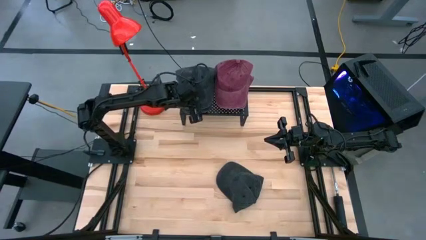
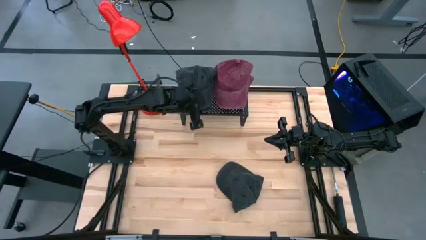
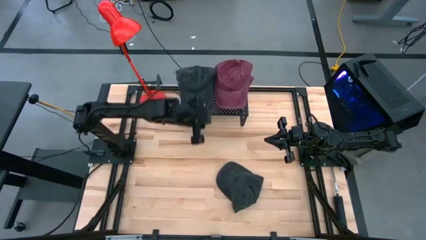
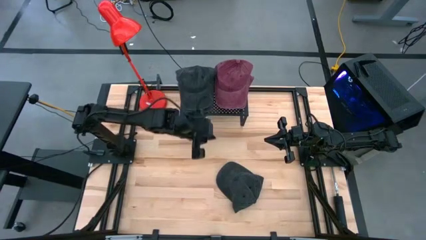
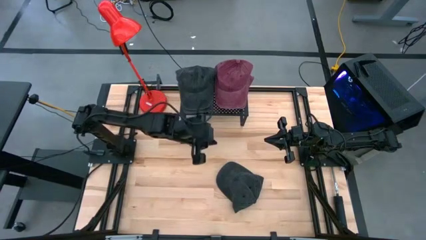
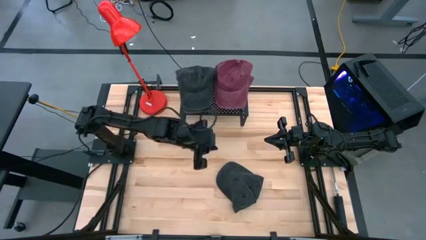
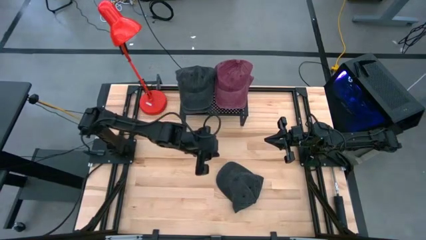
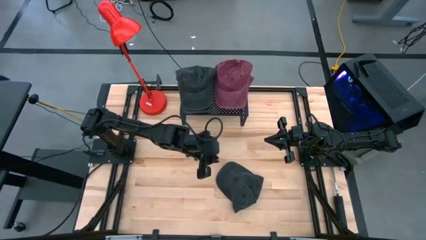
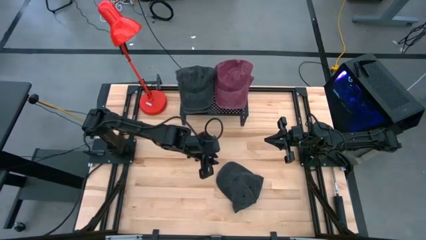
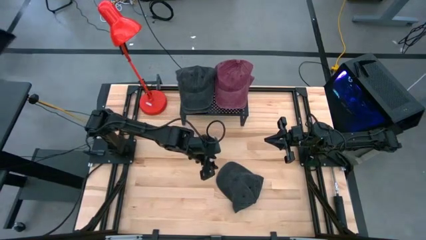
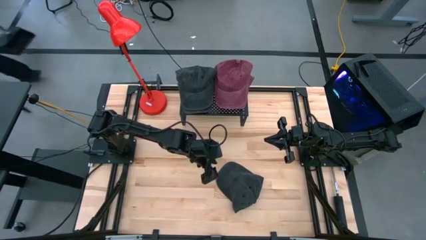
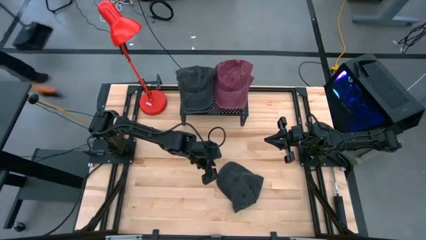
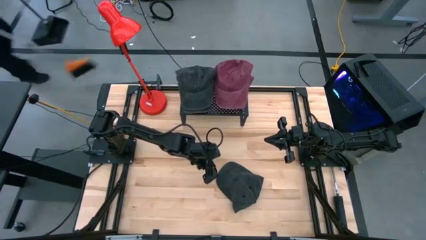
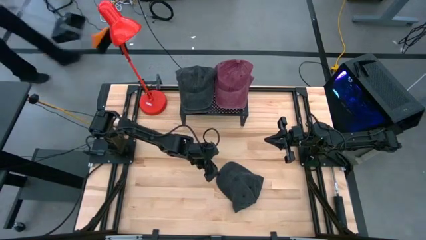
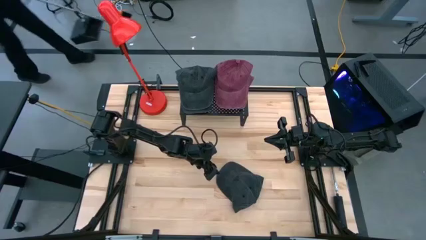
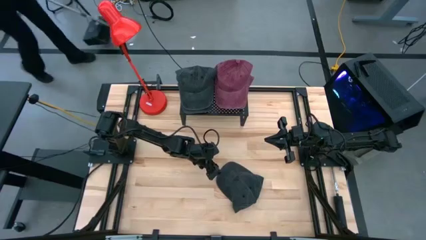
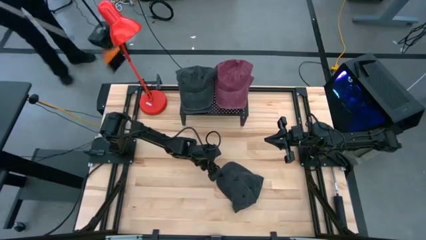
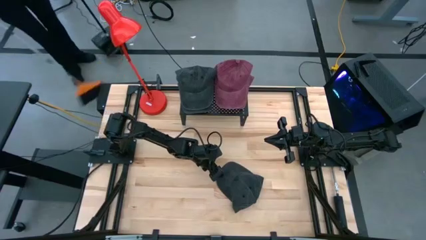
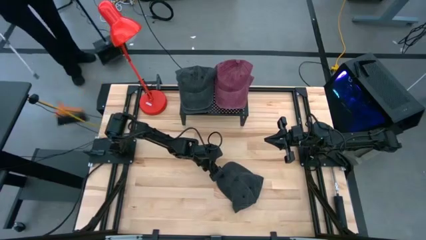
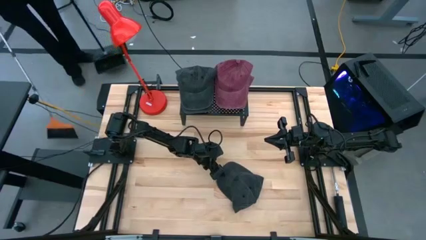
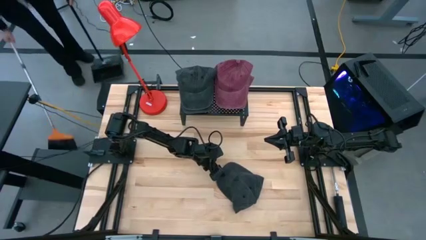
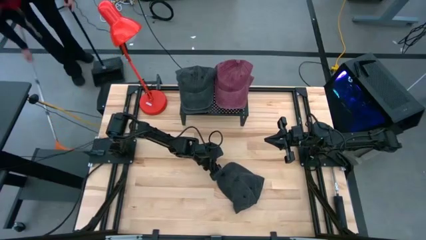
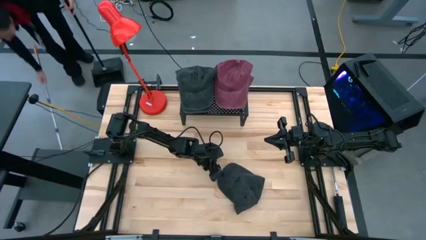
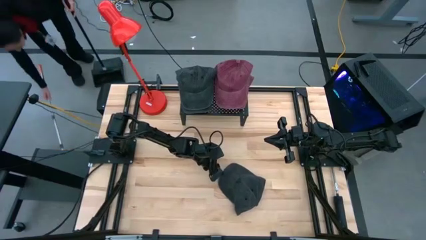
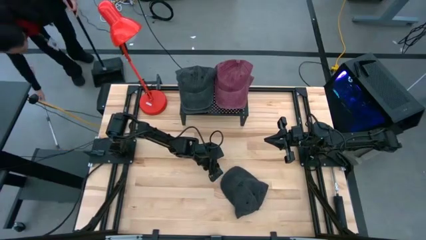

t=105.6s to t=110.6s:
Task: Pick & Place hat
Stack the black cap on top of the black cap on the shelf

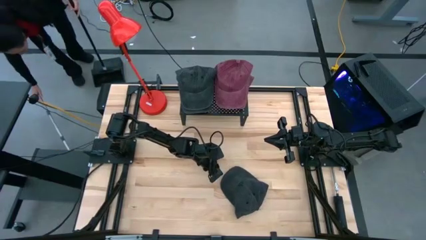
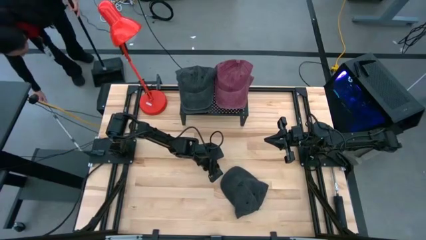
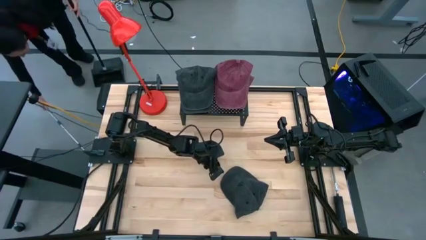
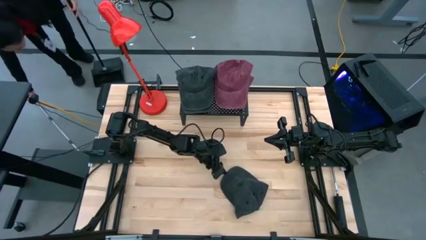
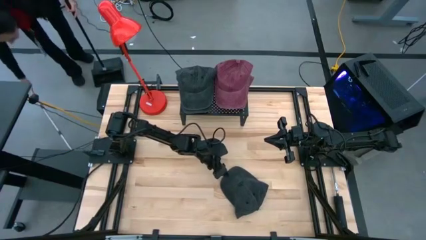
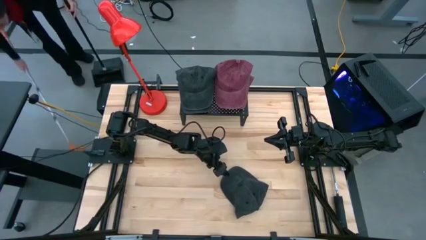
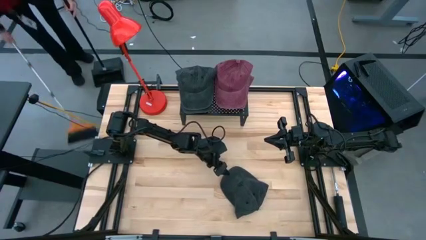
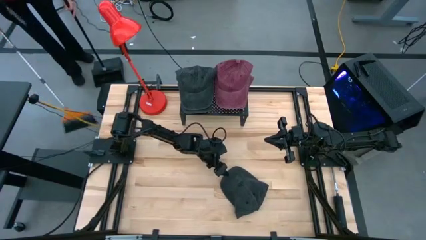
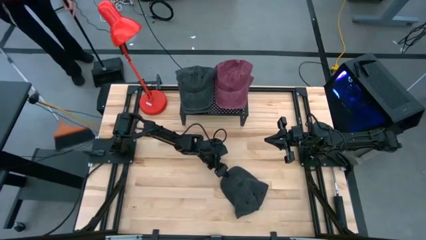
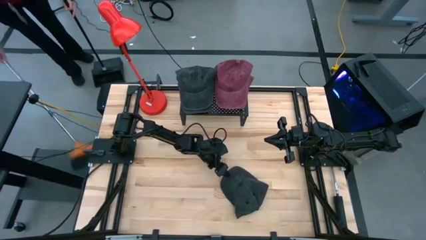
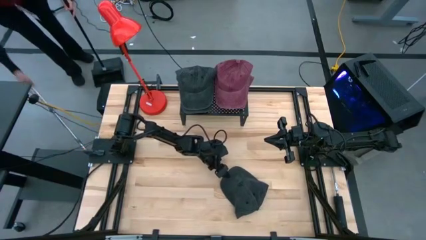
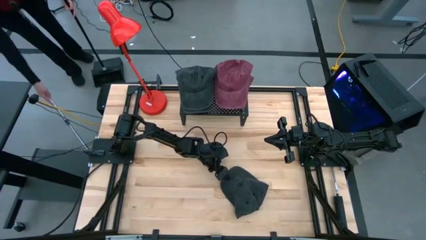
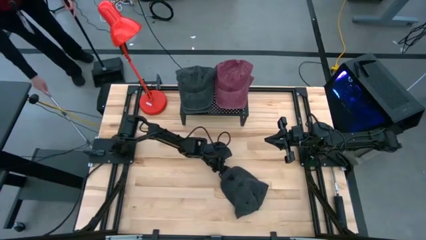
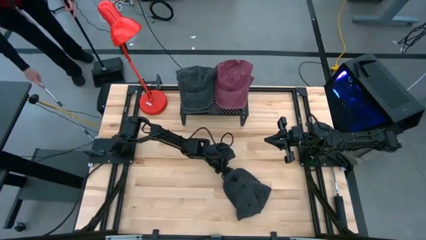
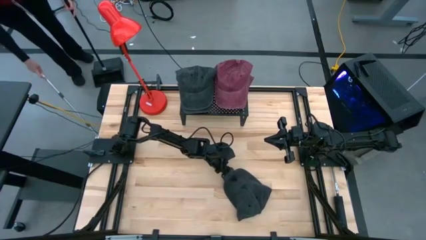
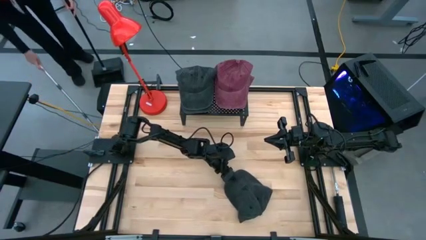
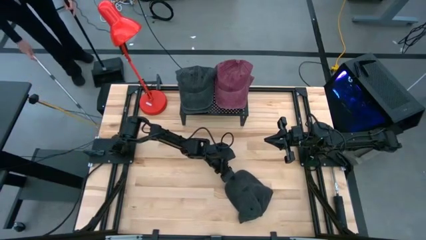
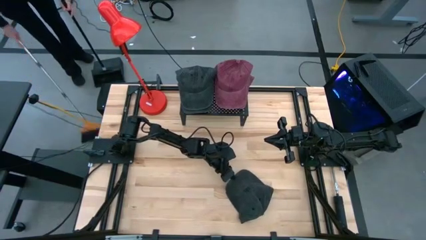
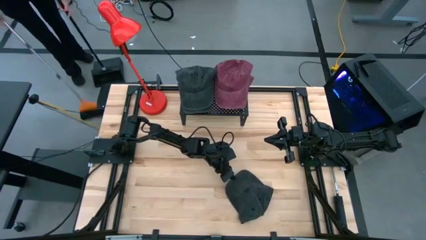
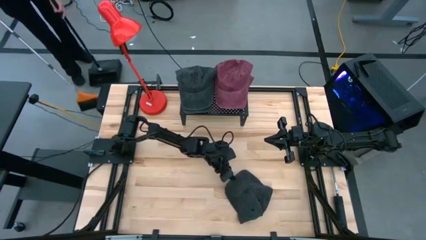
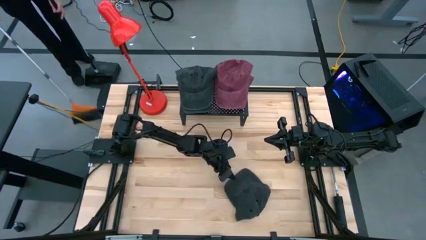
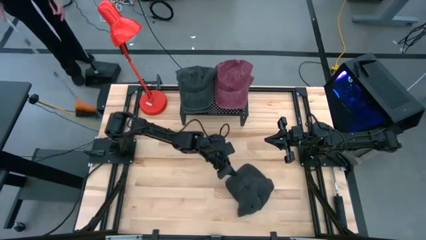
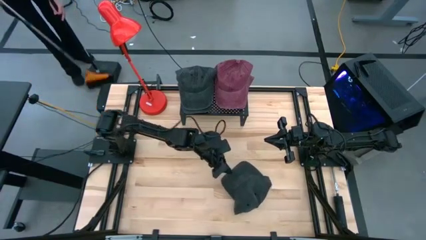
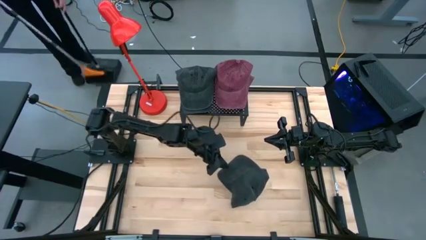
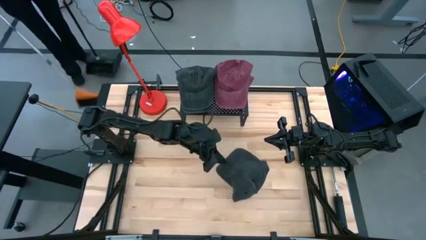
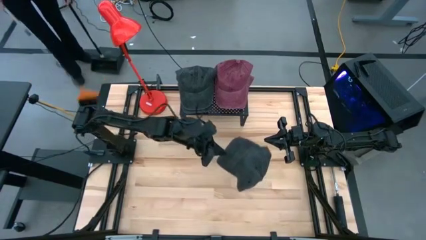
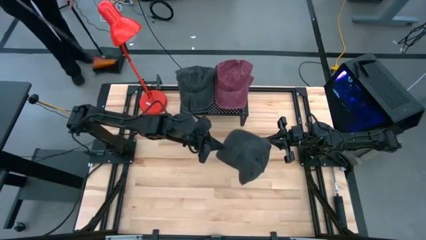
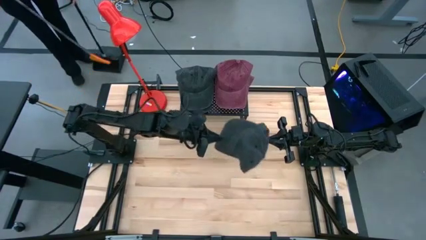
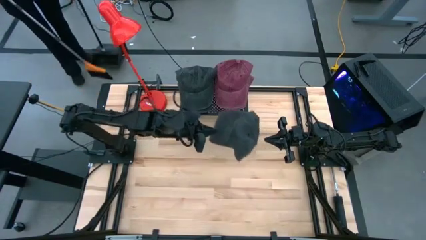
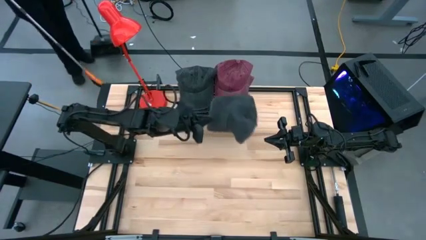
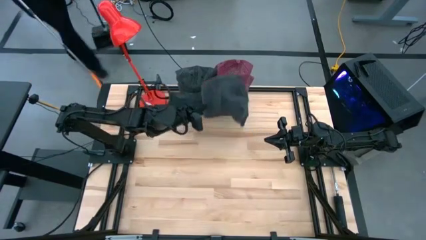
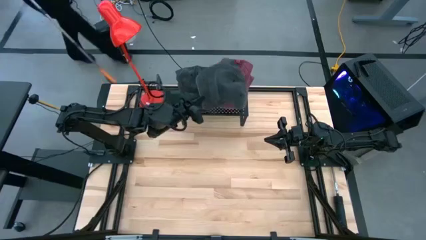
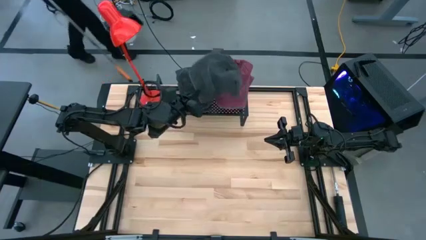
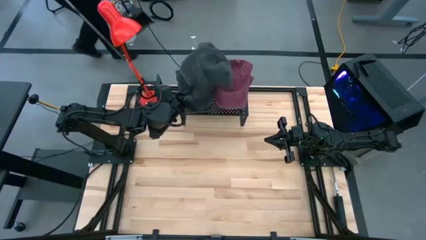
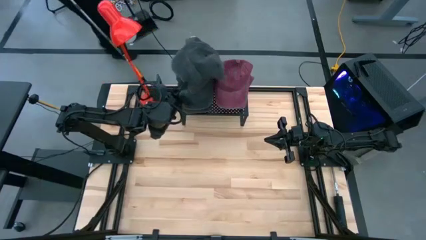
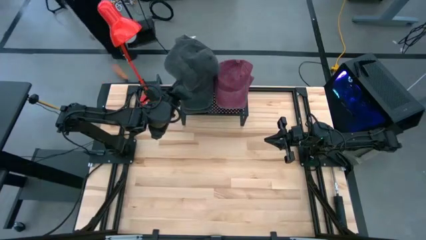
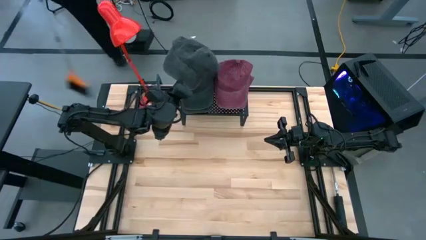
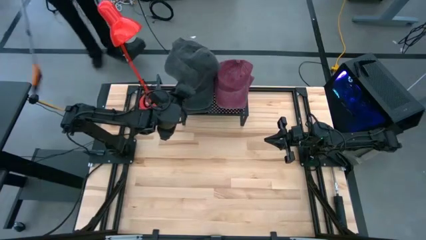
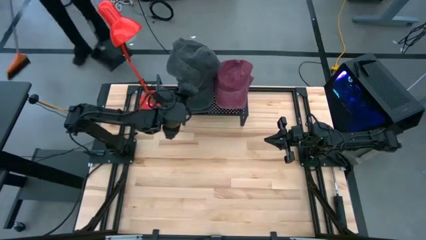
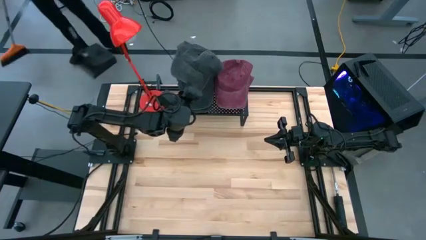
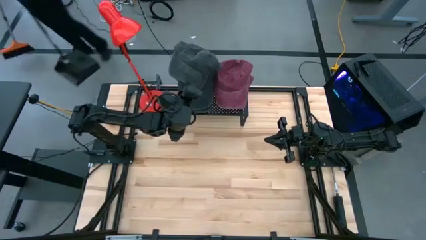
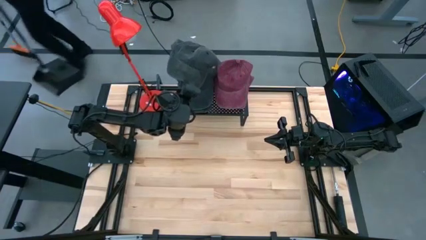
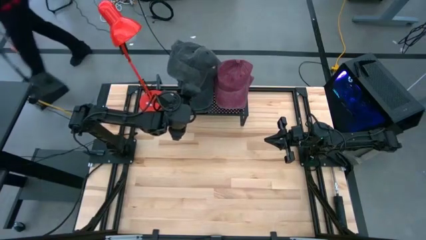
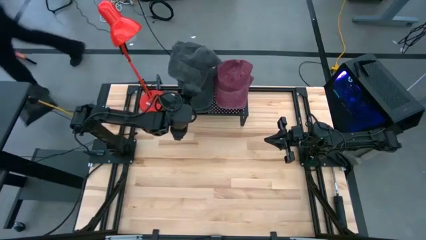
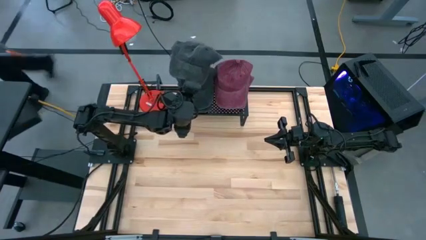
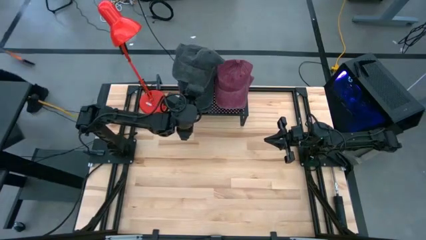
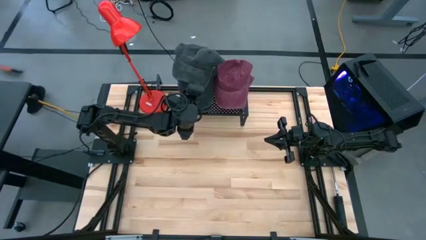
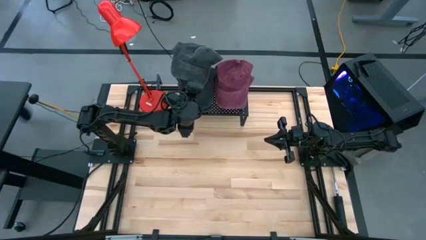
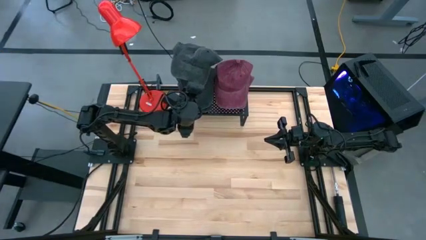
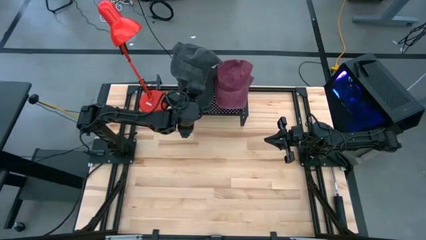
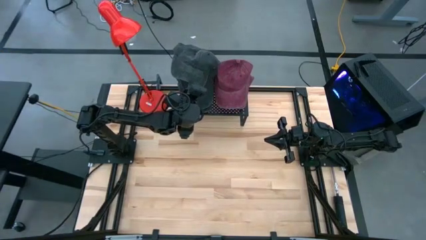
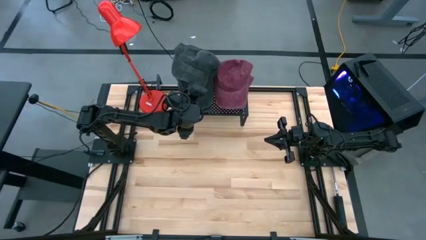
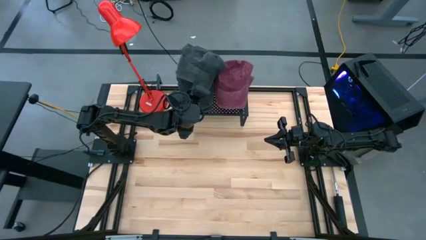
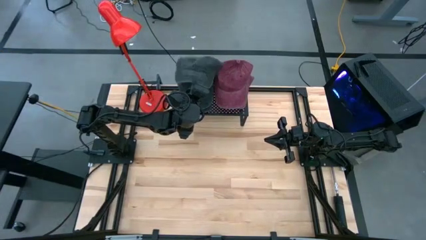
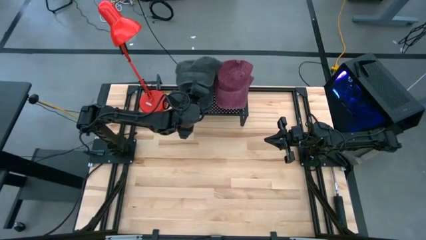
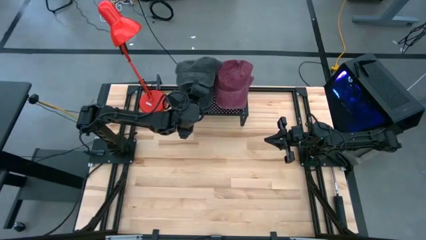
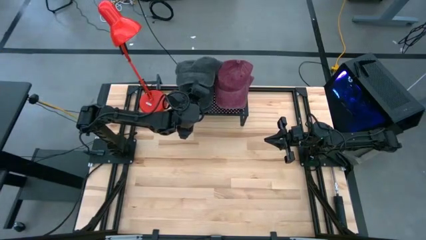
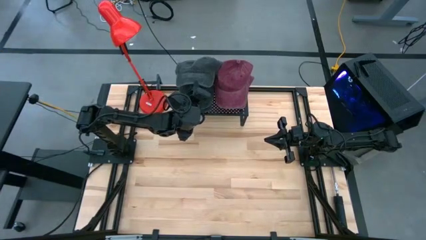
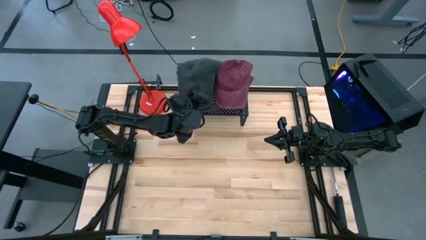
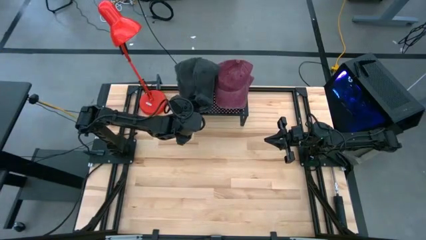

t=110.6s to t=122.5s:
Stack the black cap on top of the black cap on the shelf
